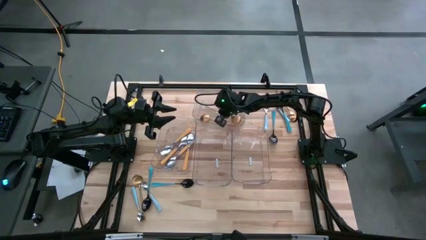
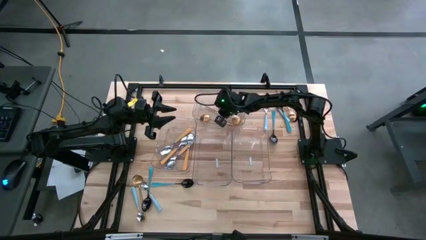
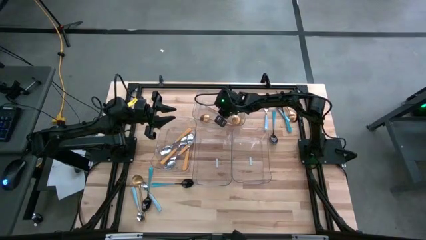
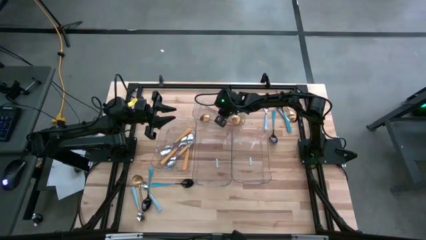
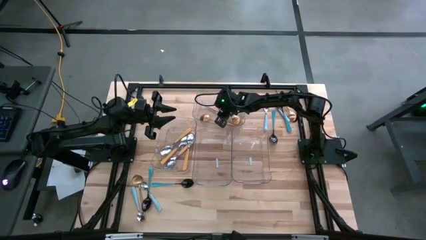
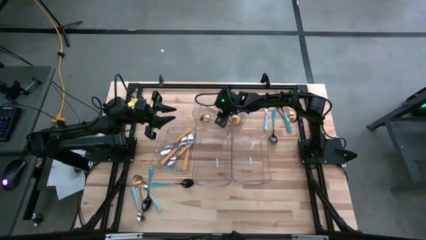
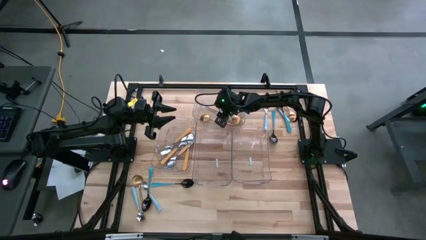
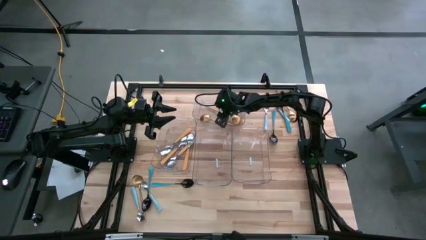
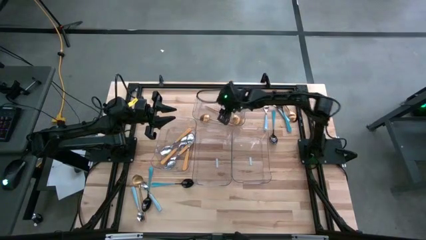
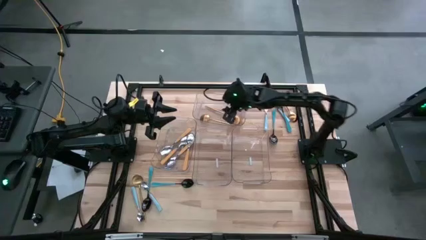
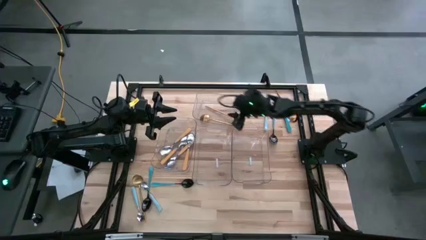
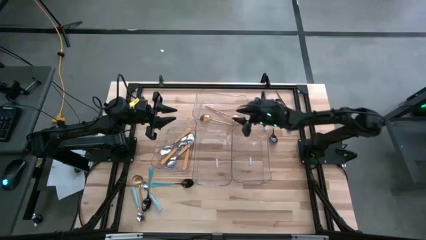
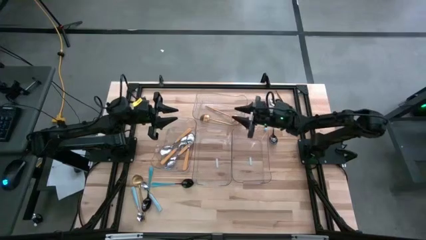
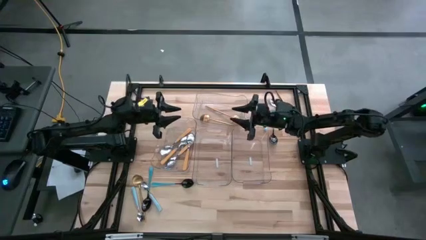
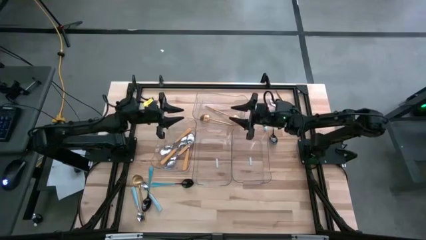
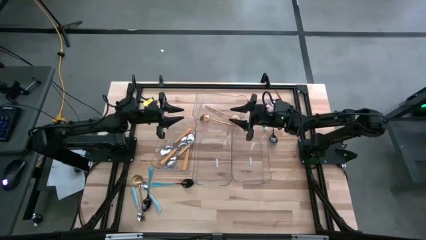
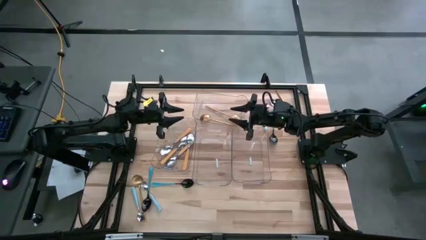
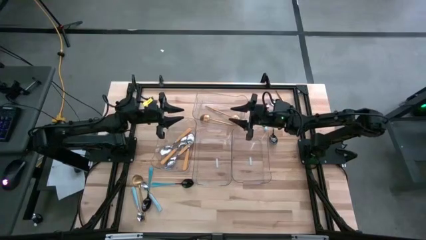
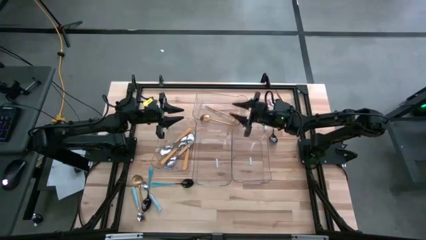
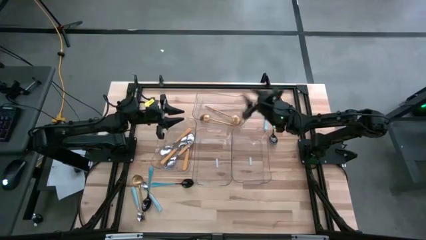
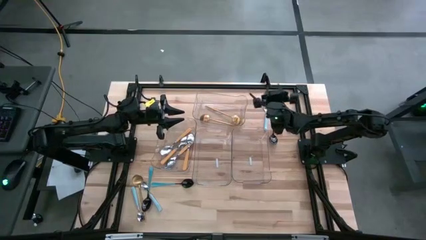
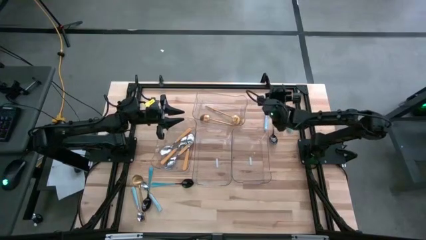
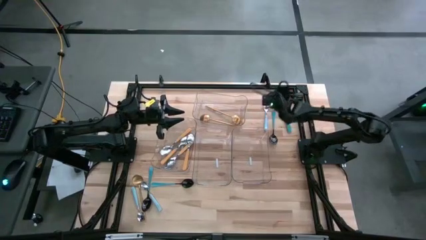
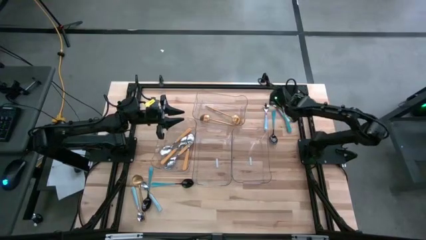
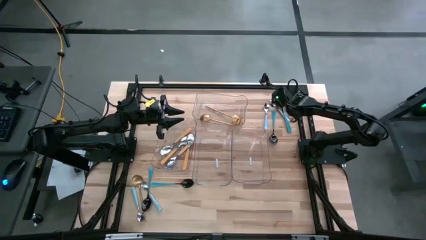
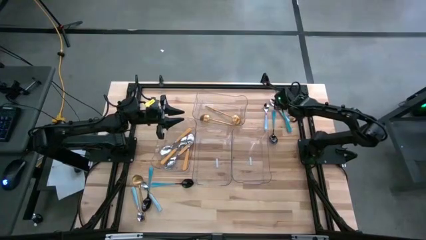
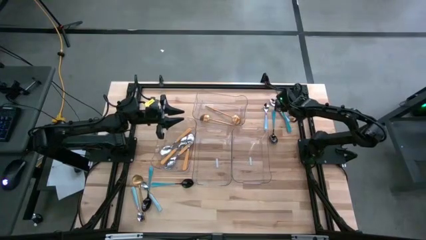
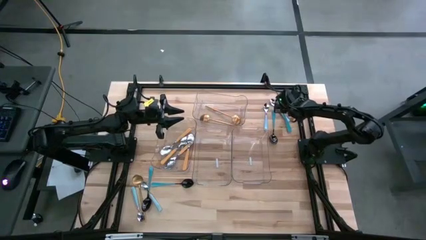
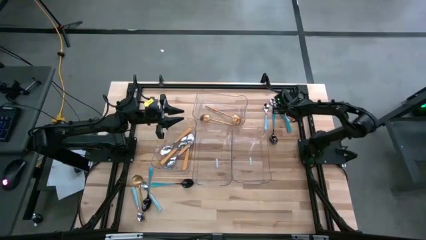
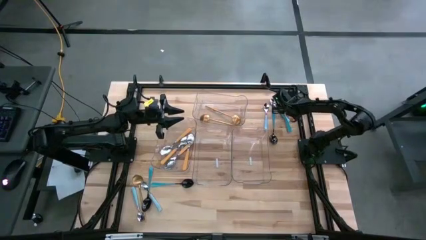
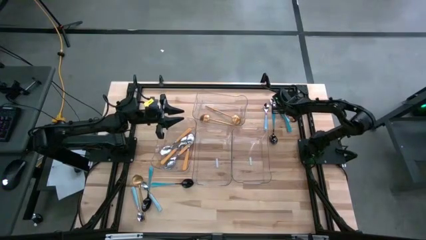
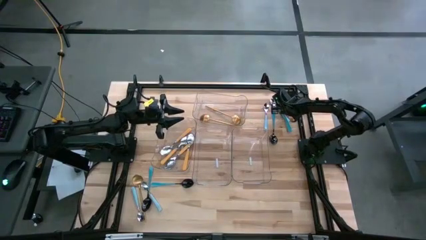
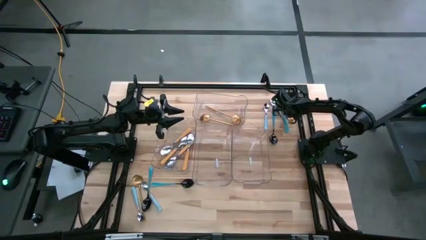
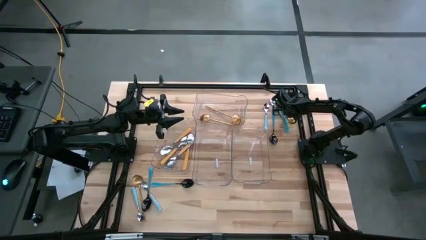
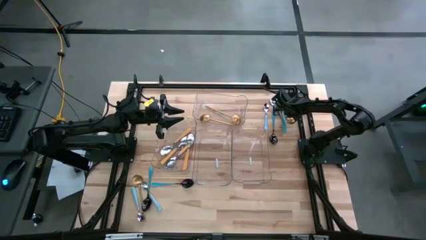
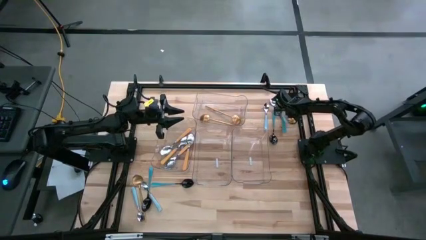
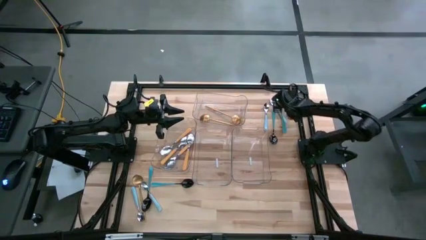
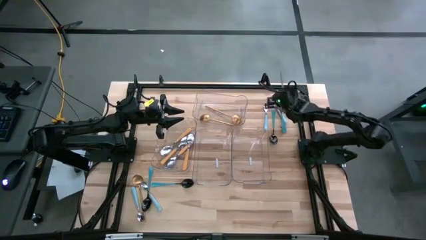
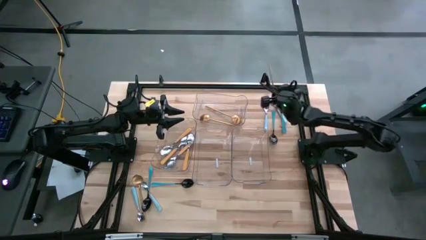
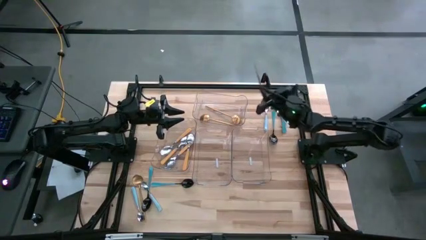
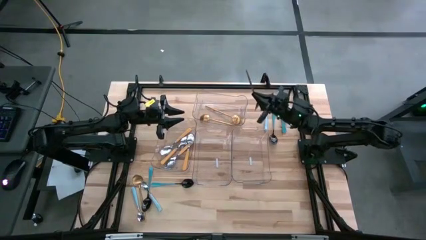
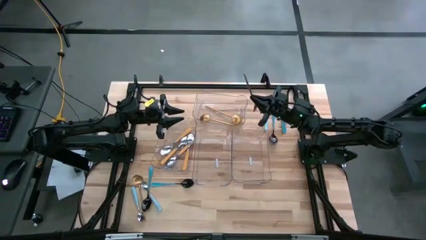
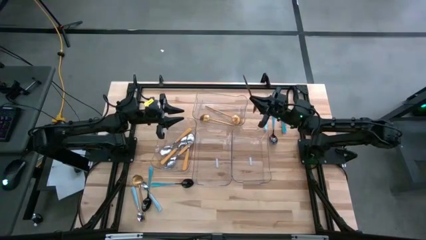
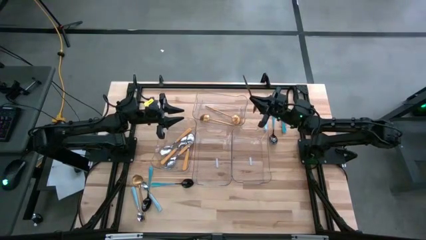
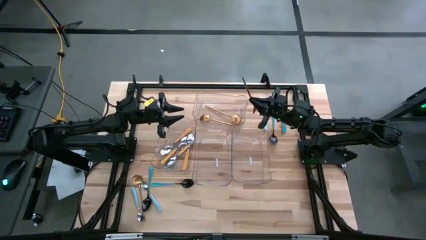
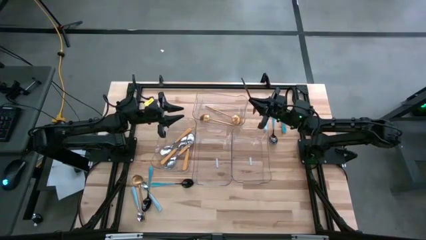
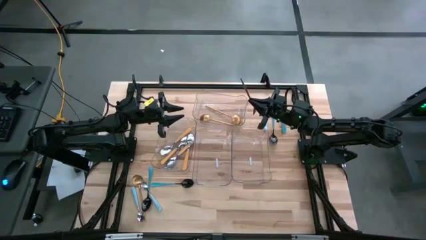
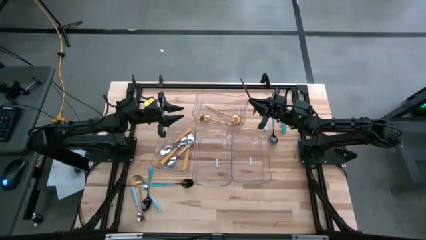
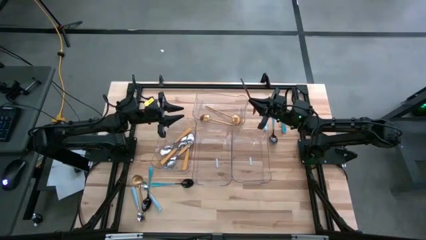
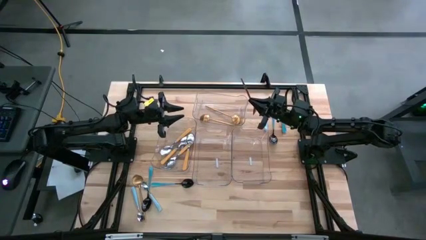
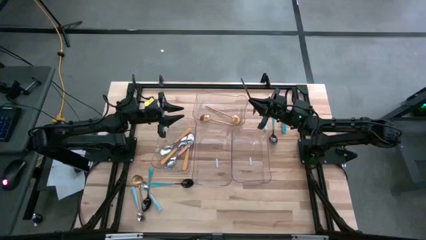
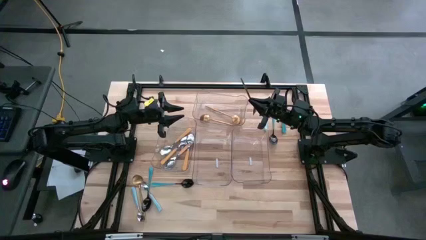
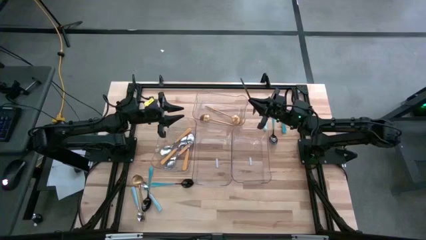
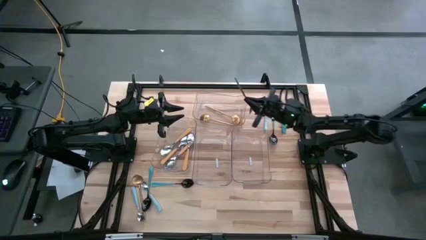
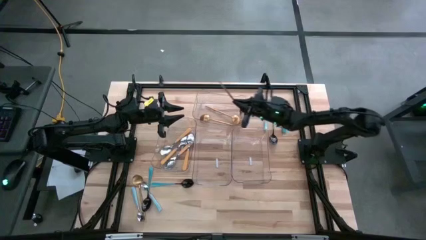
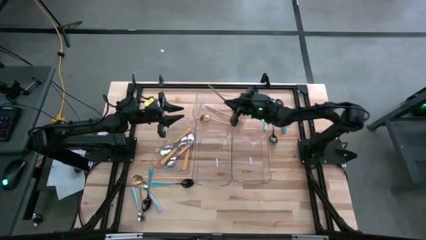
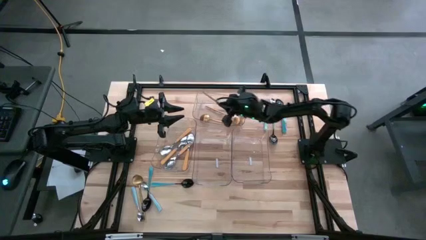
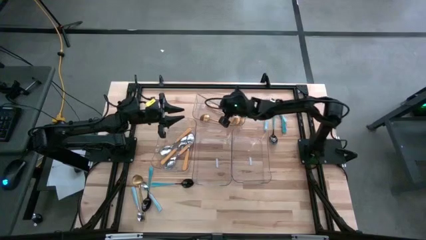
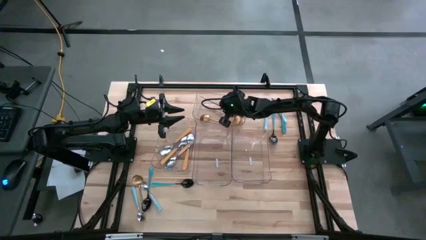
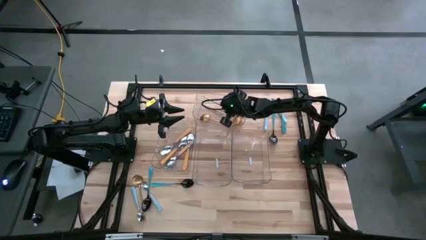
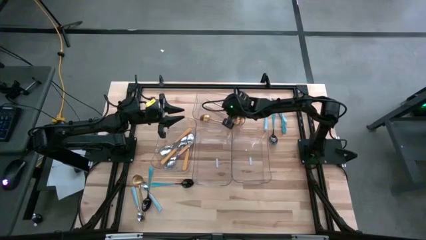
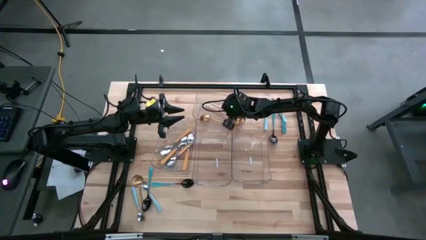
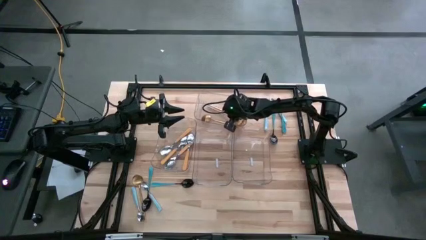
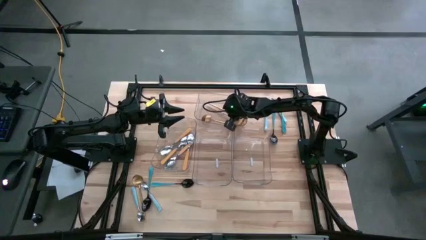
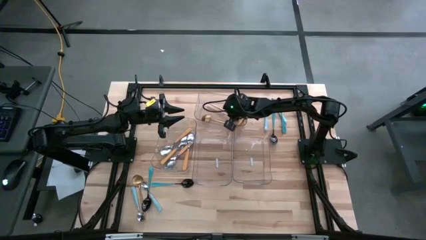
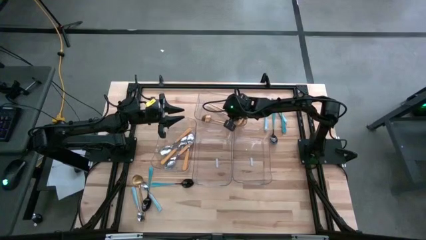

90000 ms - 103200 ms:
Task: Sort silverware by color (type)
Put the gold spoon into the top transparent bin

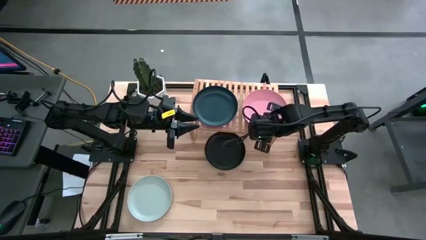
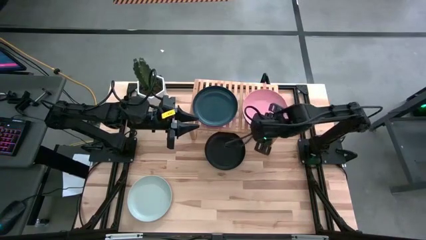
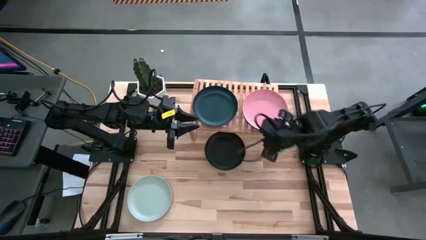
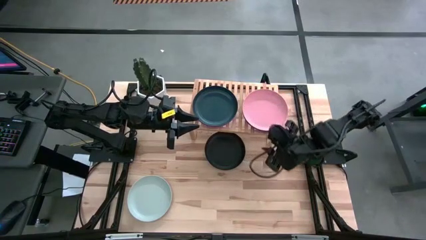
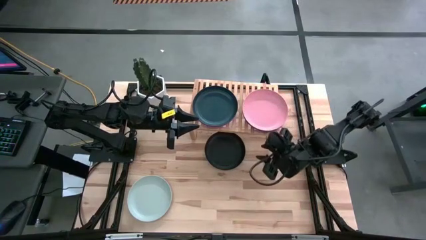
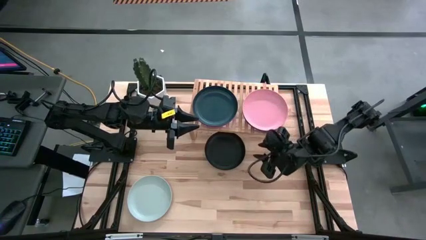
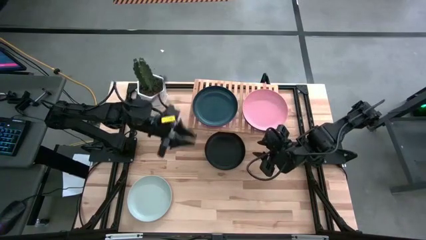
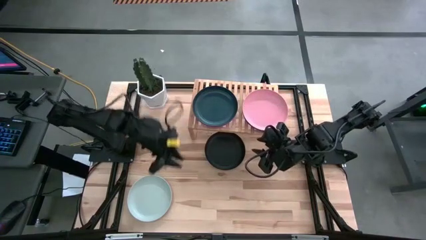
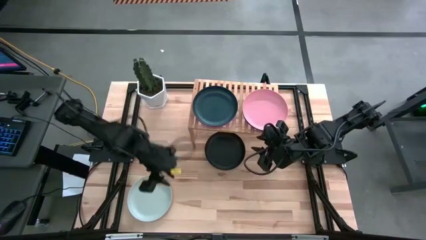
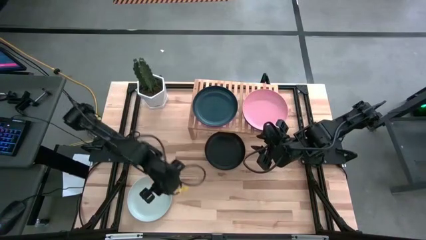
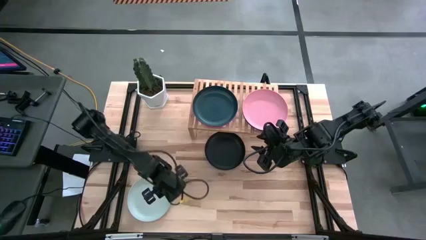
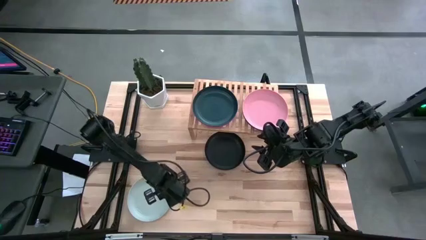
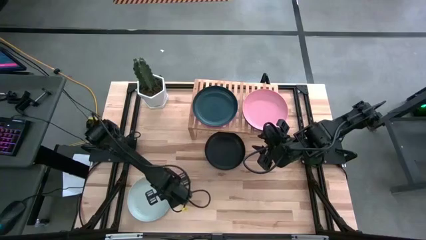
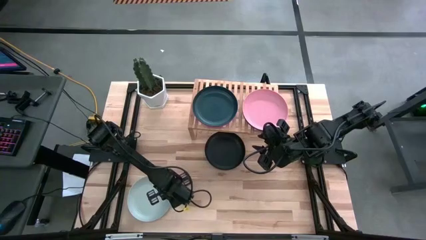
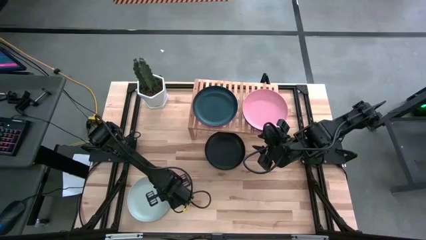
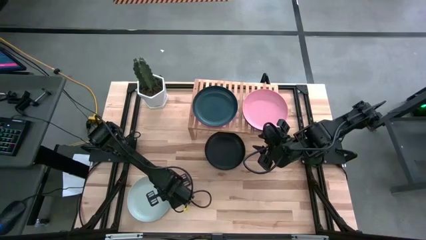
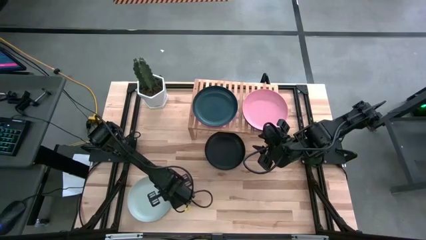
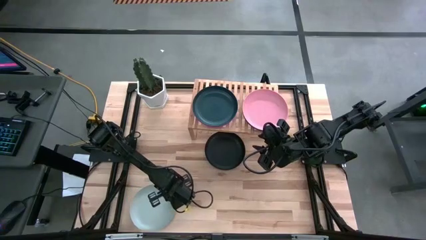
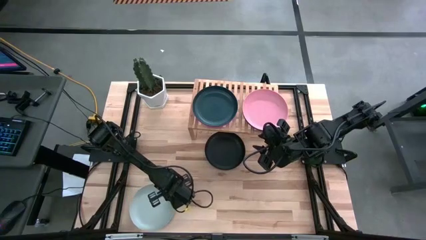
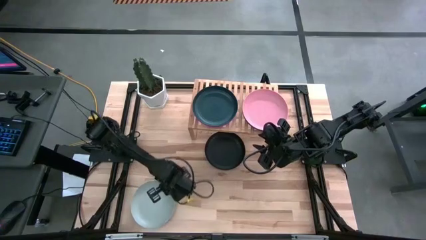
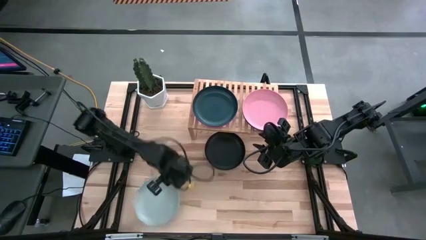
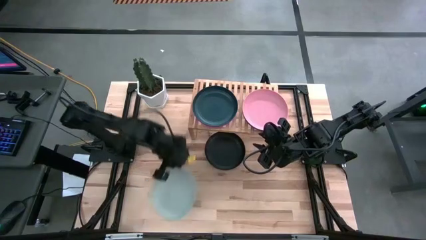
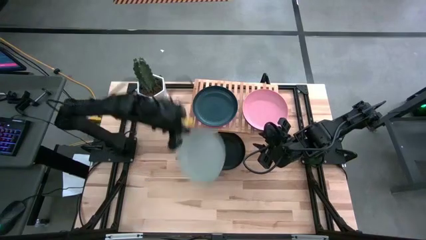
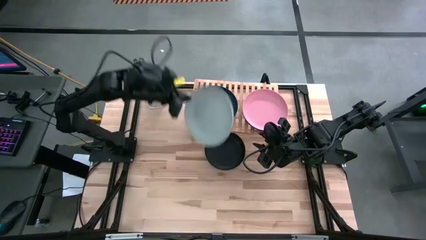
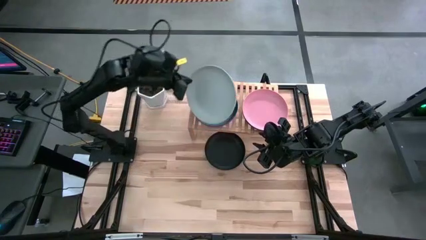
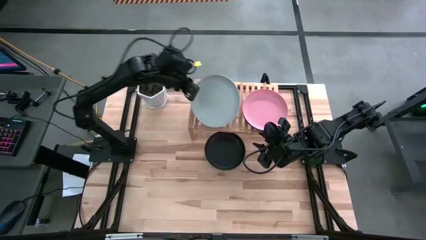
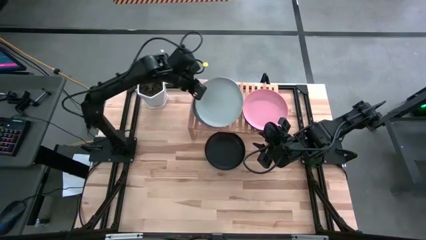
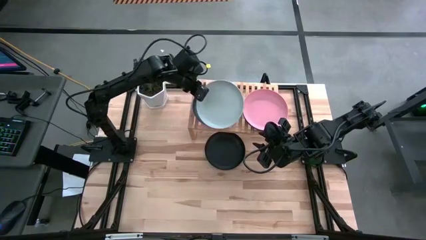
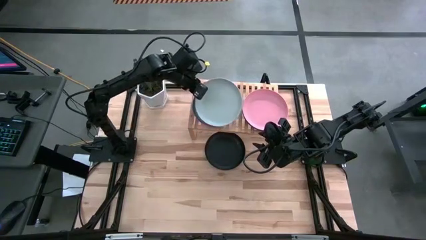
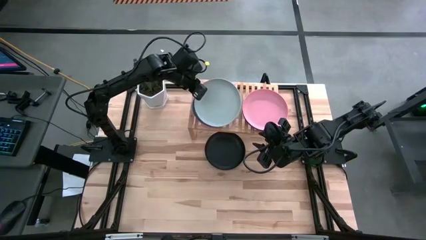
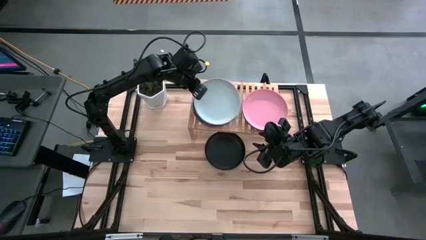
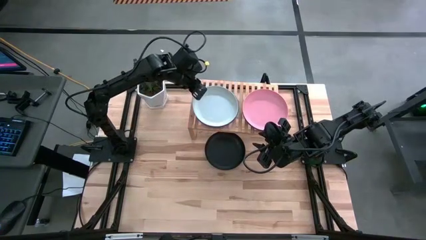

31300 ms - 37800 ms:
Task: Place and stack plates onto a shelf
Stack the white plate on top of the dark blue plate on the shelf
